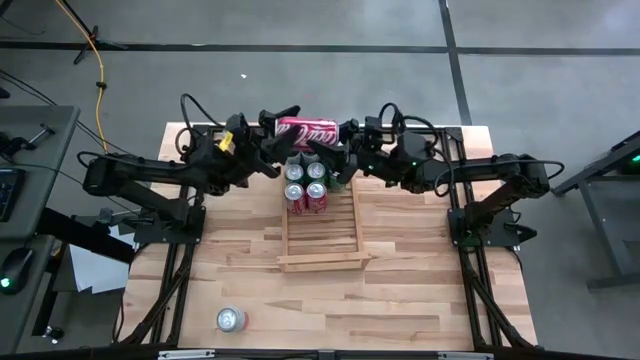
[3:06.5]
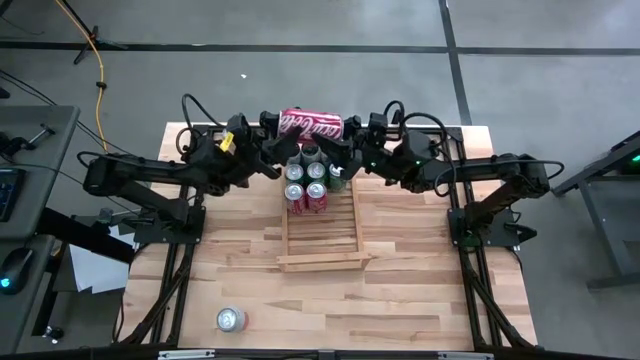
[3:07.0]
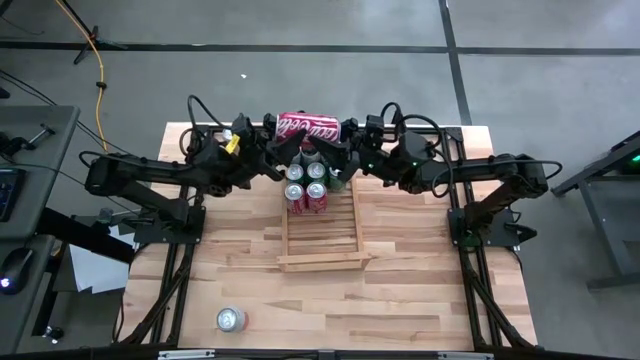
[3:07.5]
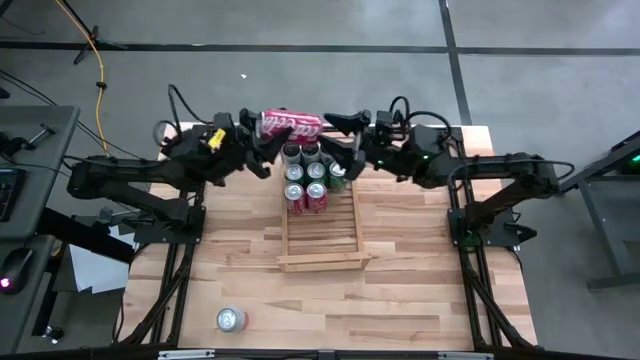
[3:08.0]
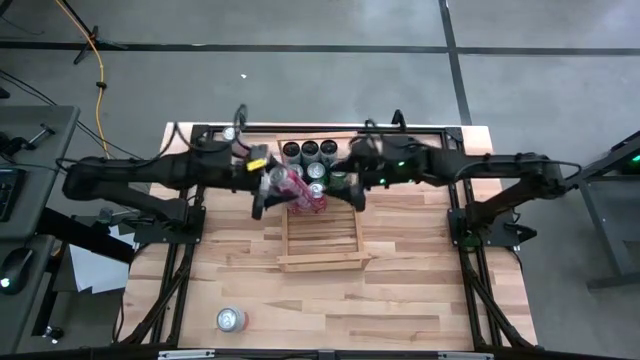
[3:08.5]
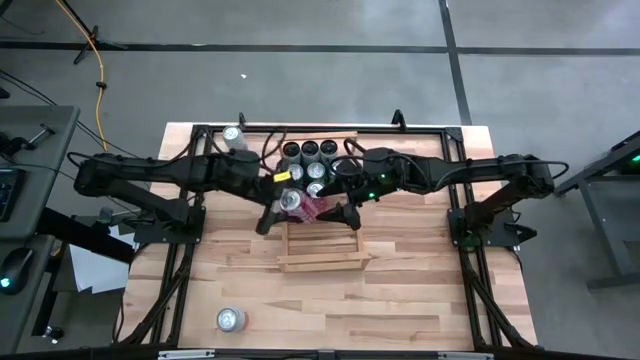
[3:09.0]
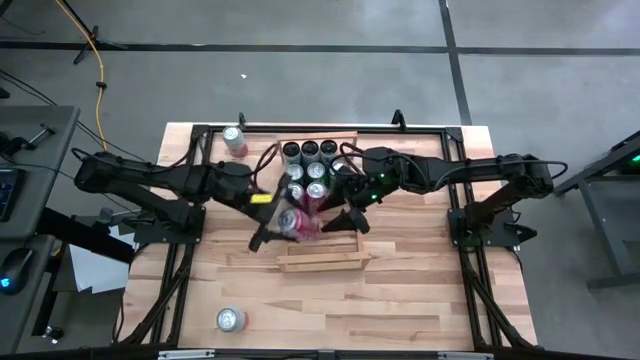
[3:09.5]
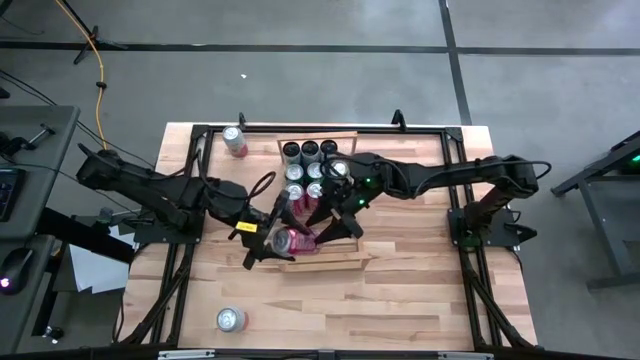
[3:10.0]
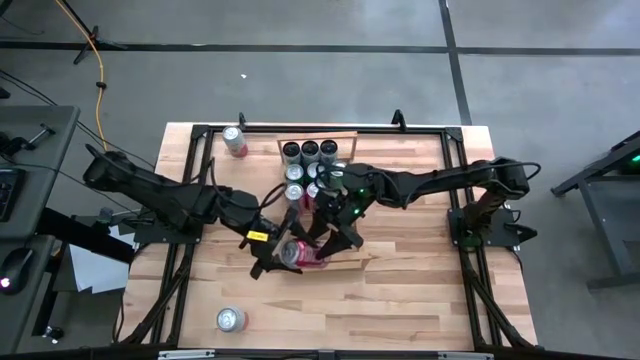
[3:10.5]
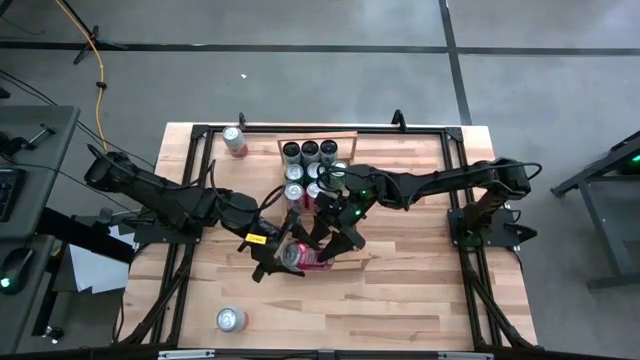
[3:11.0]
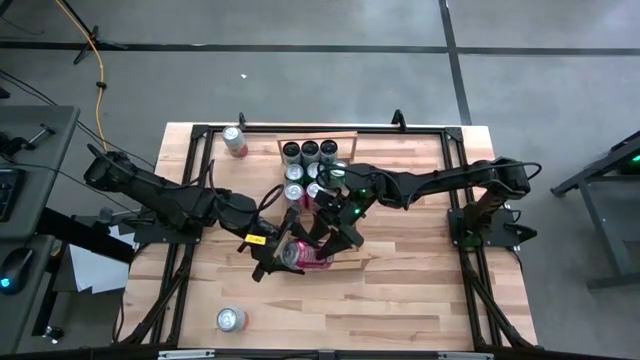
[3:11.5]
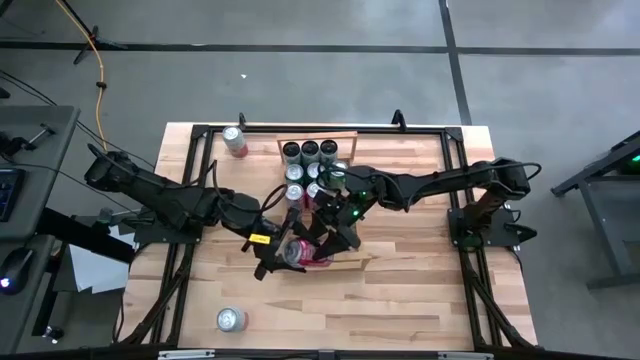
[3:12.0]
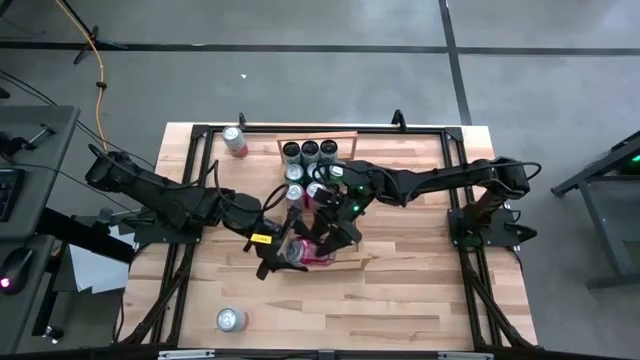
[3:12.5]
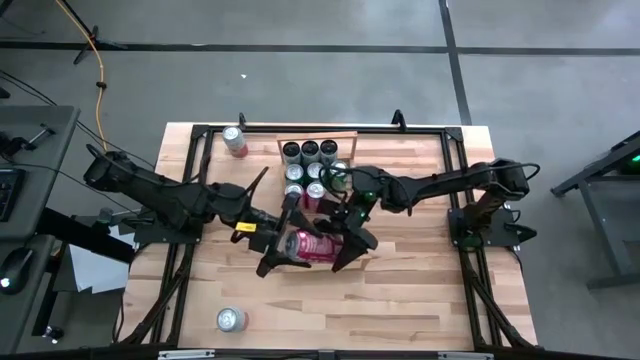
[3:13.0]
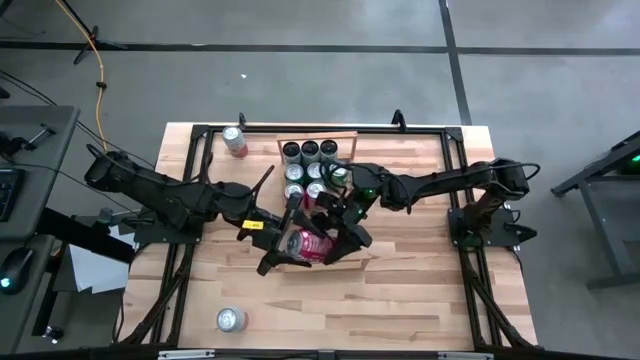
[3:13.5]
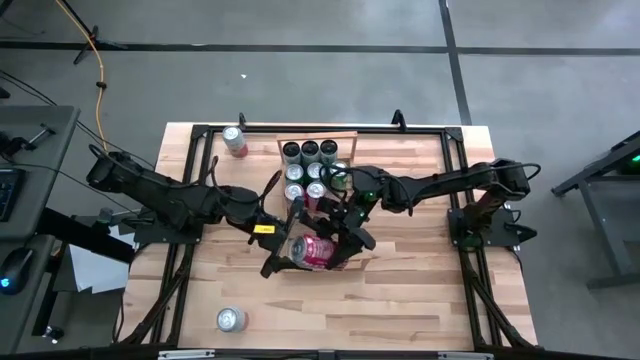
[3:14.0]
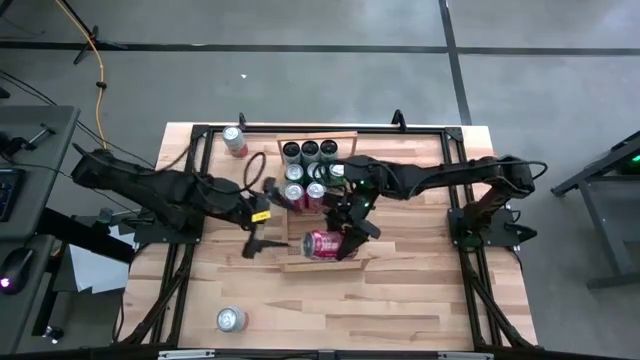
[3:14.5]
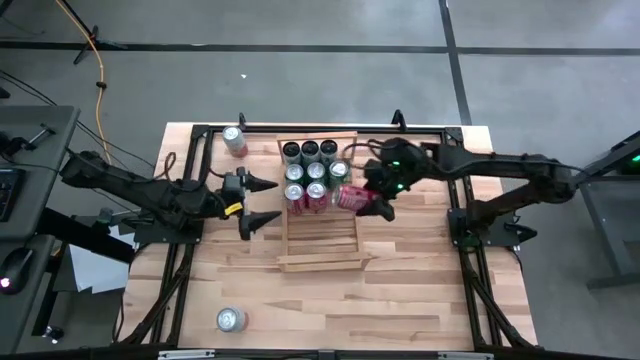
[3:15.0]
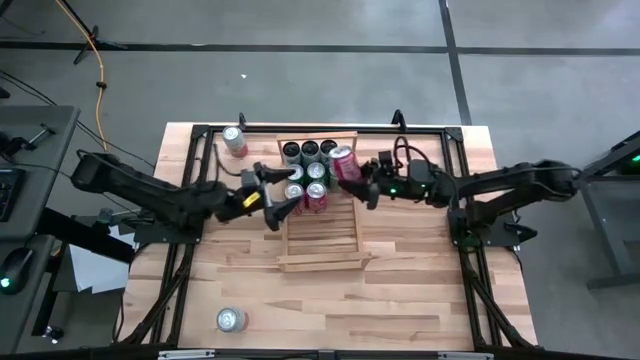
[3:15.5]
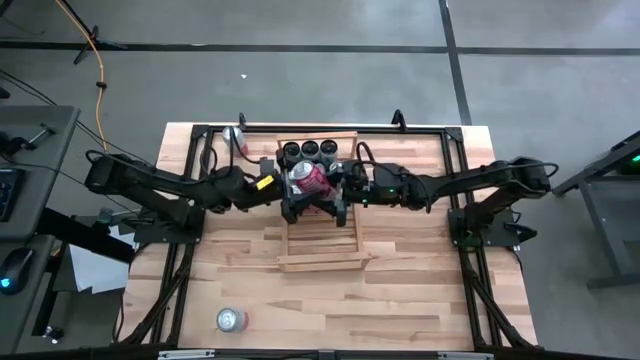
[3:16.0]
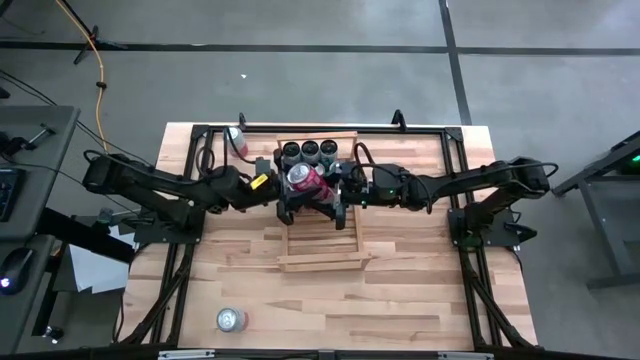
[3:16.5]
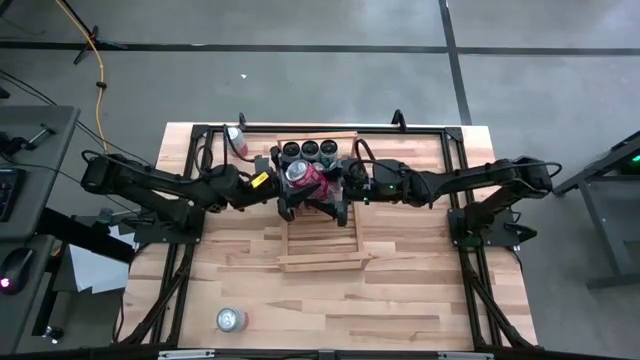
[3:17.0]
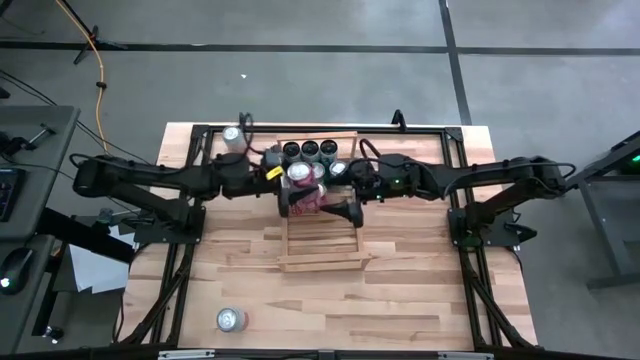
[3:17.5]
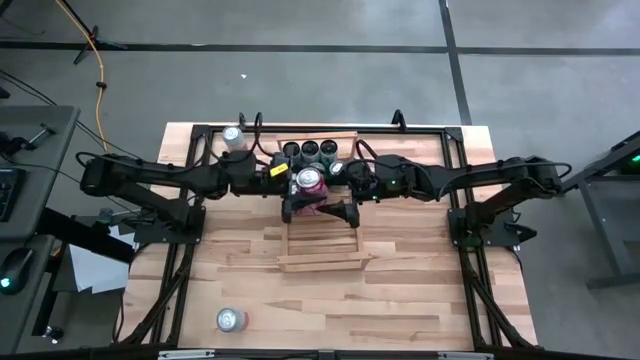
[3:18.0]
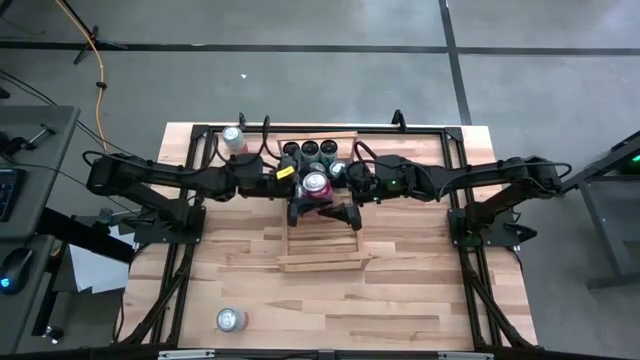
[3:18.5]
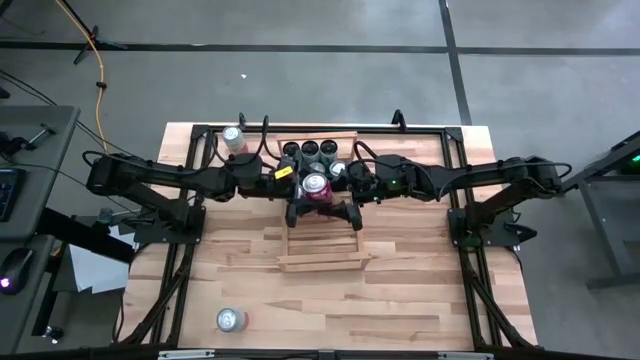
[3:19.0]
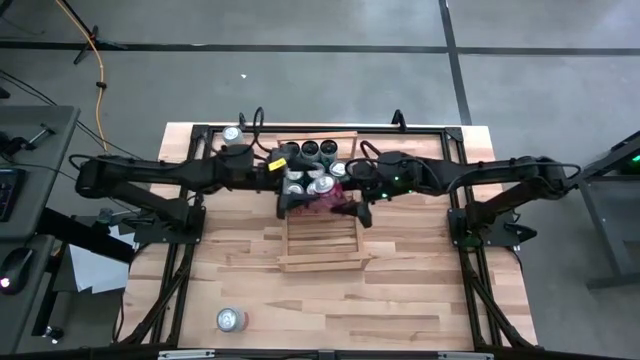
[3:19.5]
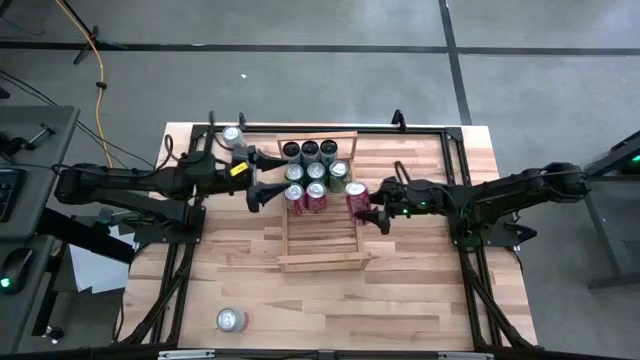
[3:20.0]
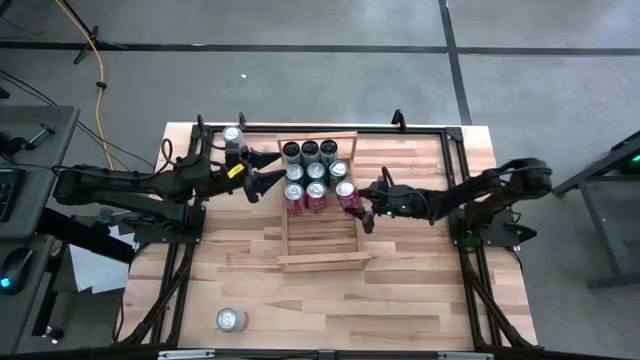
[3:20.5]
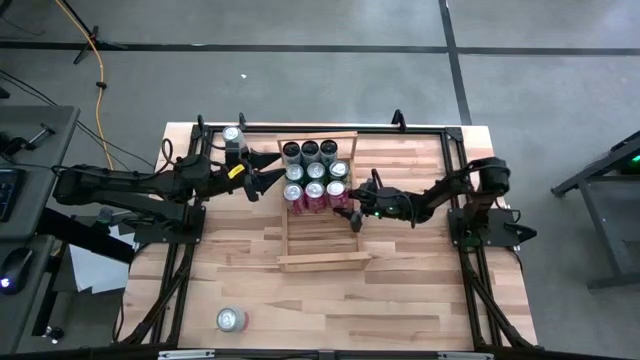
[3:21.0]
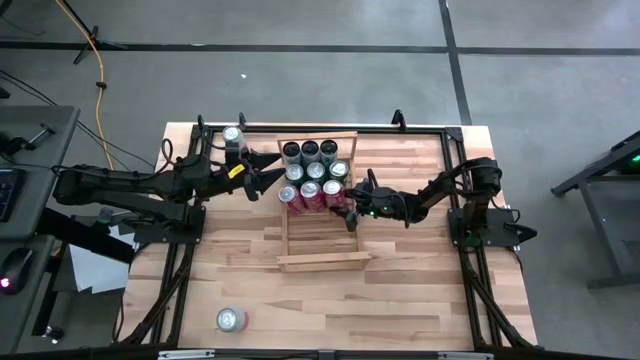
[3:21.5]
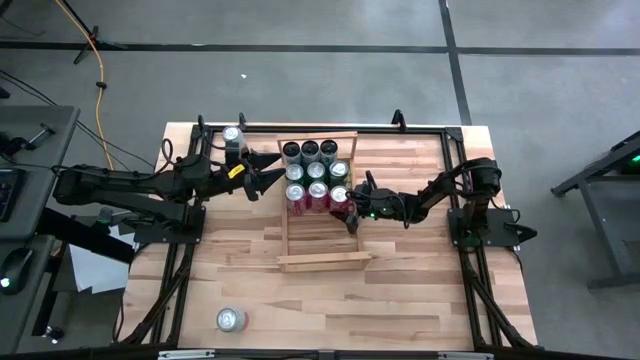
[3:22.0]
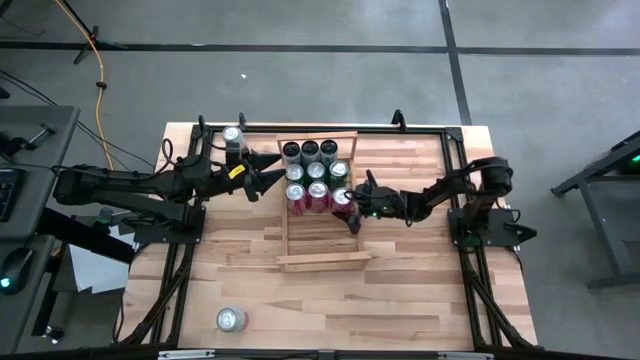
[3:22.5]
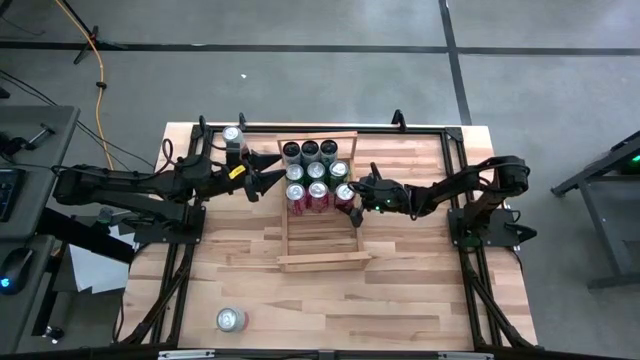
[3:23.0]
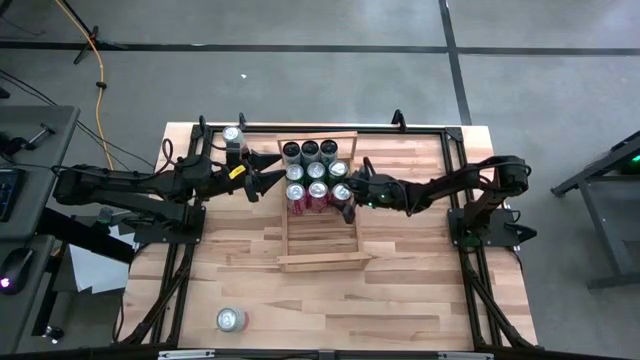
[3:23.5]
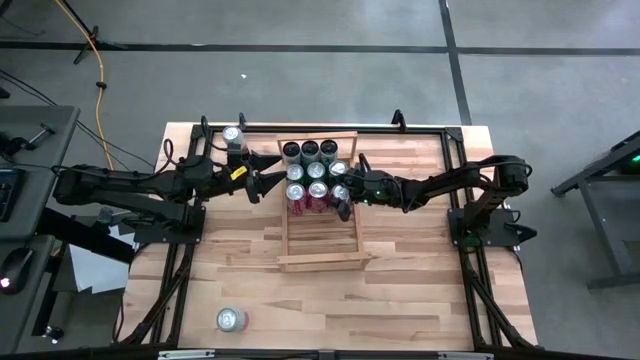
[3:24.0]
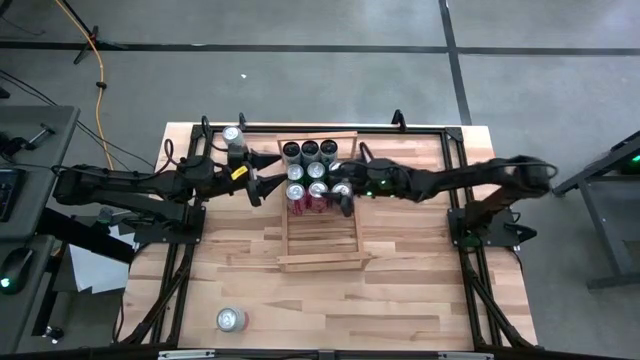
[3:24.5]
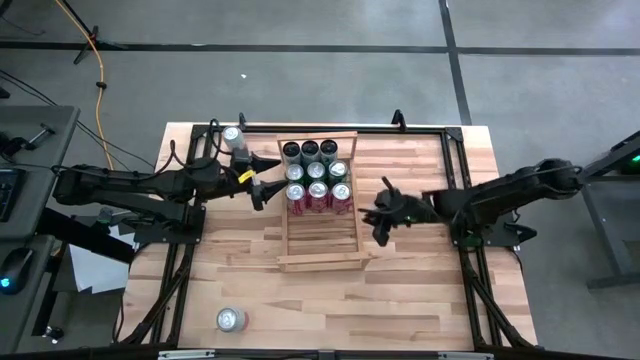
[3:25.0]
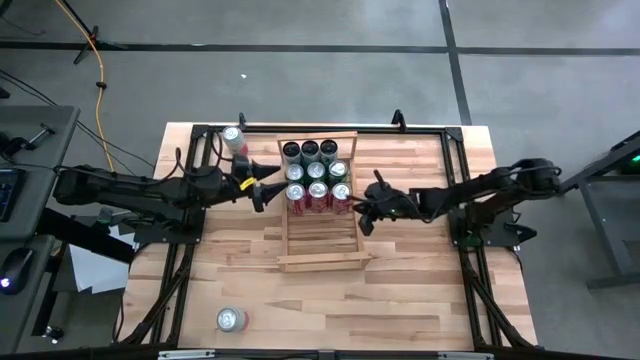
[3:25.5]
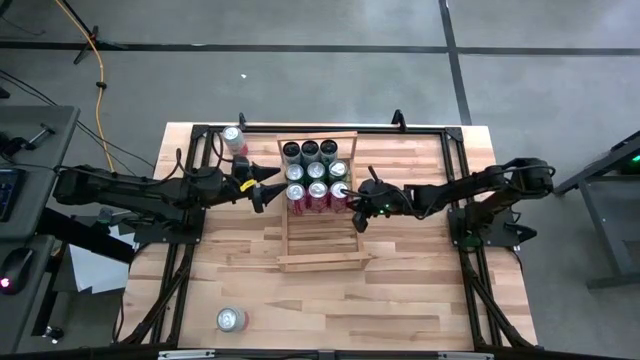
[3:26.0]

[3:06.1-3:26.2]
Task: Place canned beverage on shelf
Put the red can on the shelf aligned with the other red cans

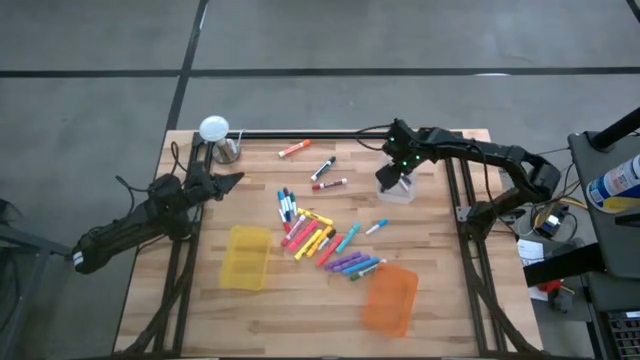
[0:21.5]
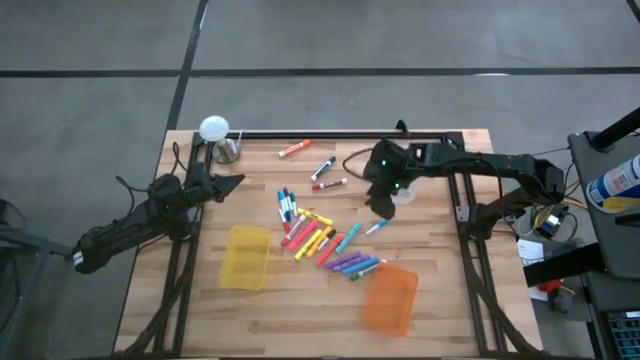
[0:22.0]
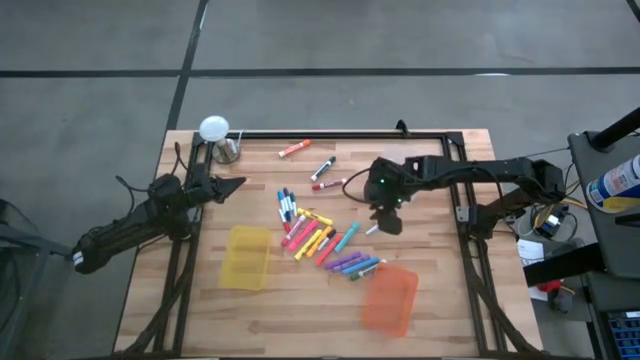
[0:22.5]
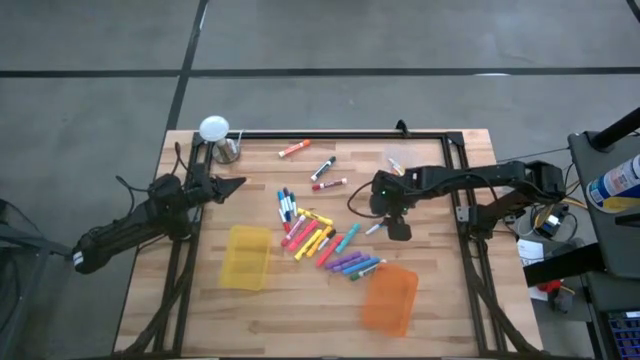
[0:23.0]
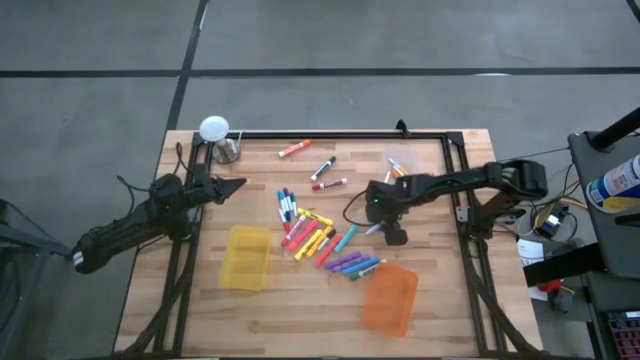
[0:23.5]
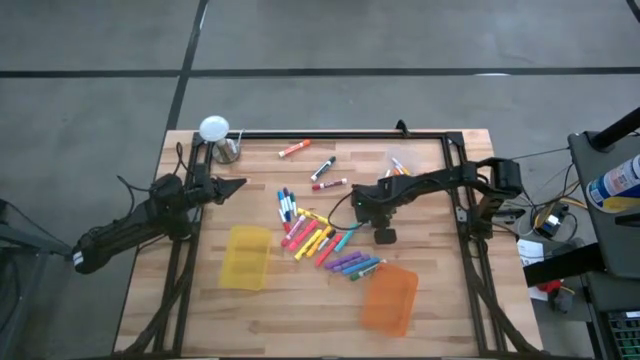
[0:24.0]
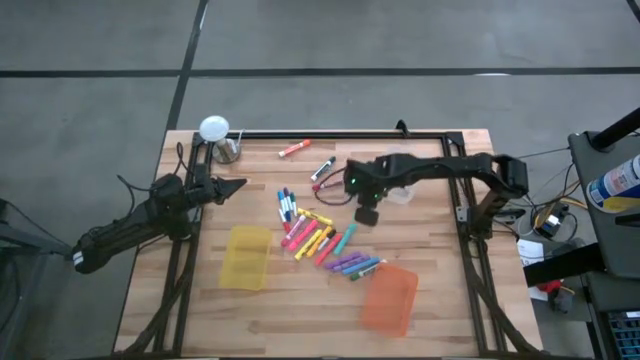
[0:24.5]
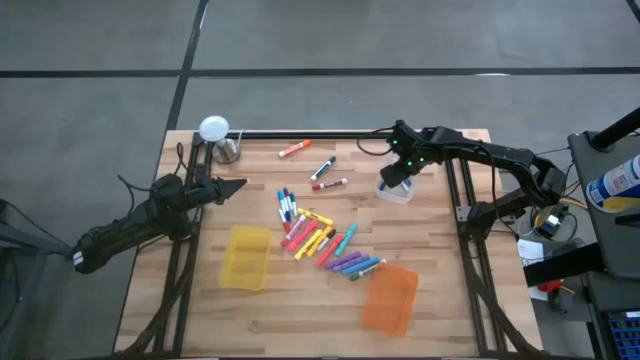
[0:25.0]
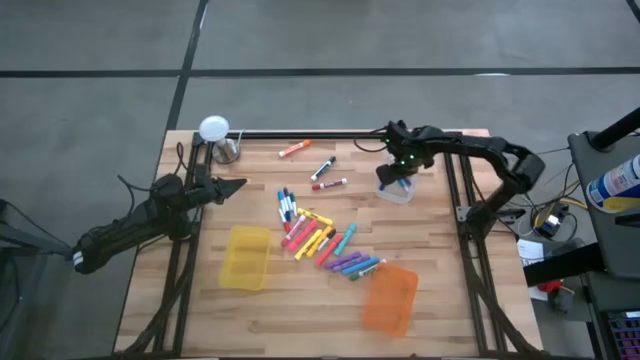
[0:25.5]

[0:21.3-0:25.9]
Task: Pick & Place Markers
Put the right small light blue highlighter pen into the transparent bin
